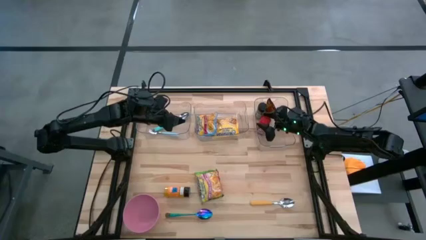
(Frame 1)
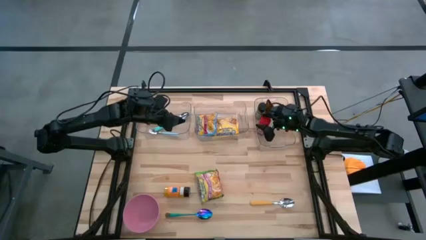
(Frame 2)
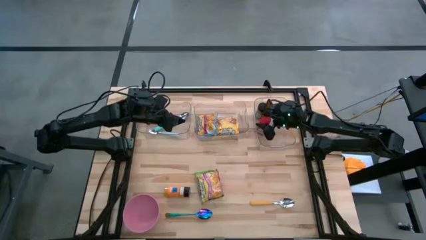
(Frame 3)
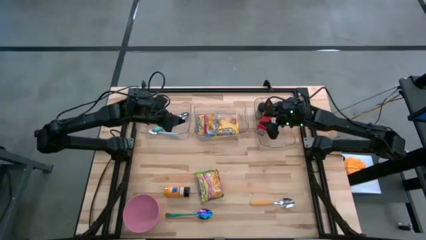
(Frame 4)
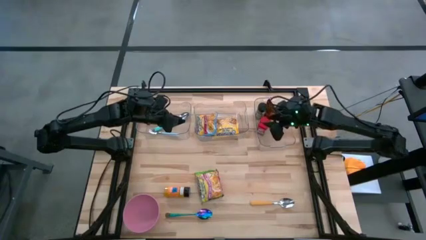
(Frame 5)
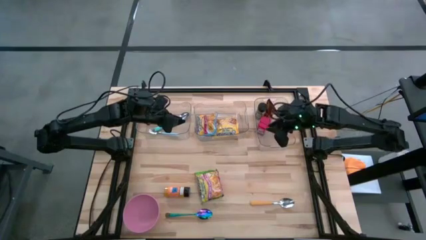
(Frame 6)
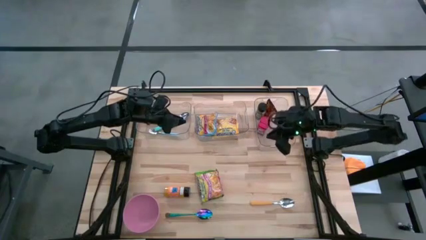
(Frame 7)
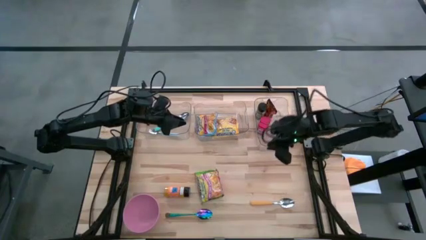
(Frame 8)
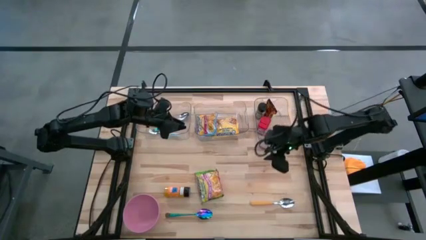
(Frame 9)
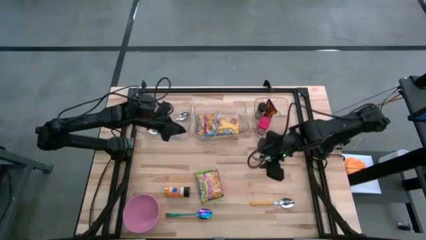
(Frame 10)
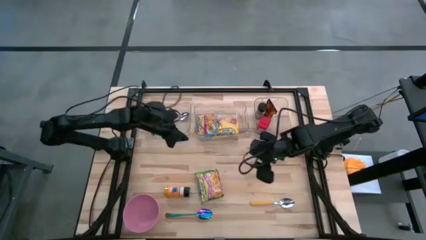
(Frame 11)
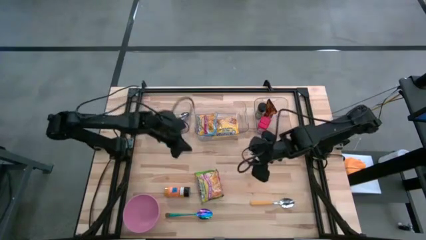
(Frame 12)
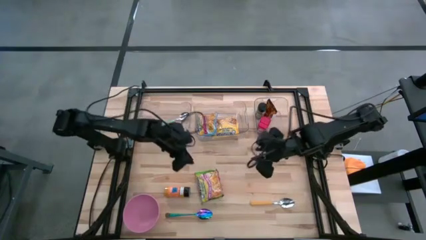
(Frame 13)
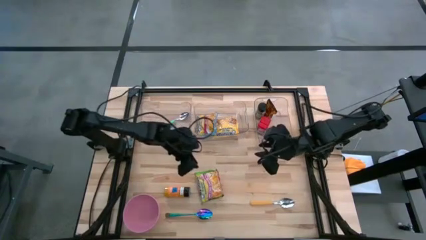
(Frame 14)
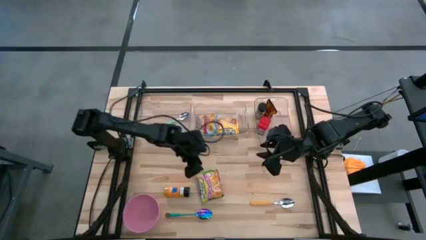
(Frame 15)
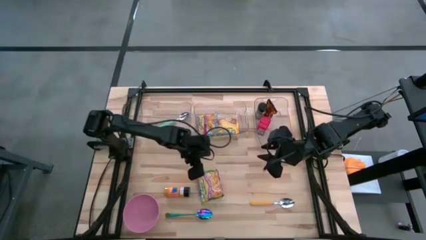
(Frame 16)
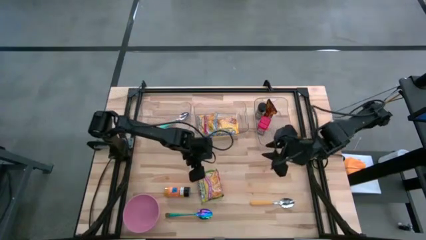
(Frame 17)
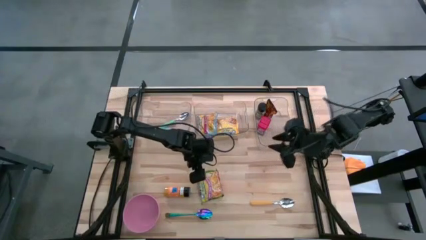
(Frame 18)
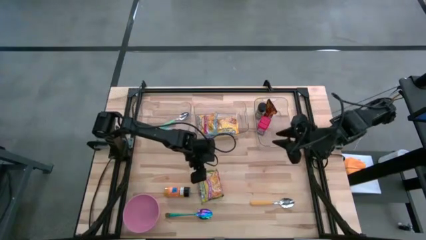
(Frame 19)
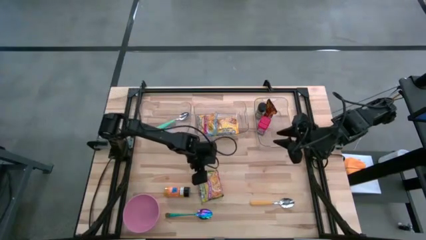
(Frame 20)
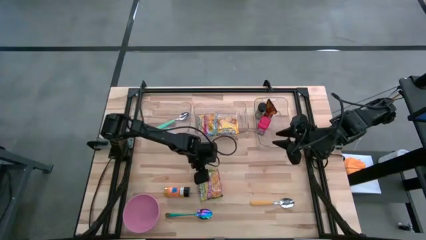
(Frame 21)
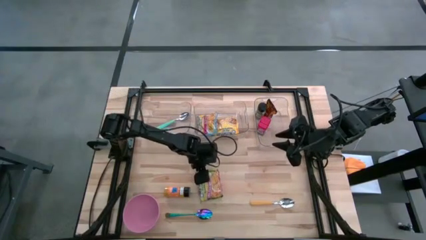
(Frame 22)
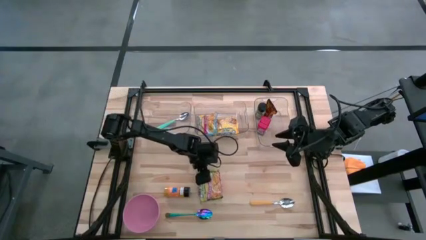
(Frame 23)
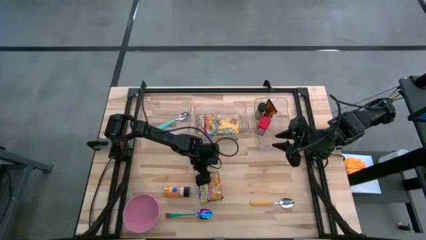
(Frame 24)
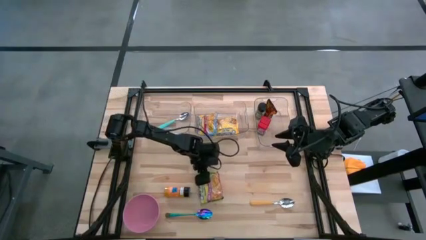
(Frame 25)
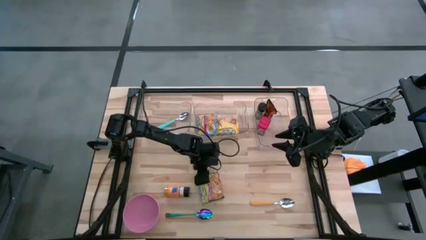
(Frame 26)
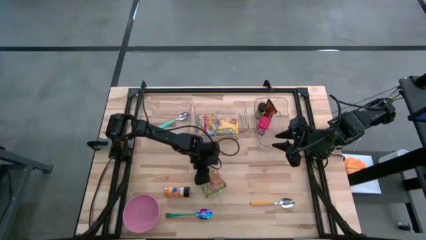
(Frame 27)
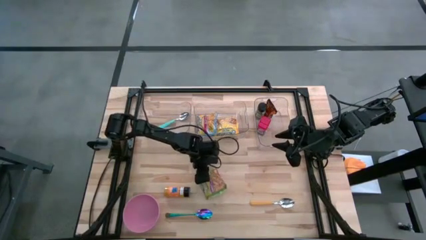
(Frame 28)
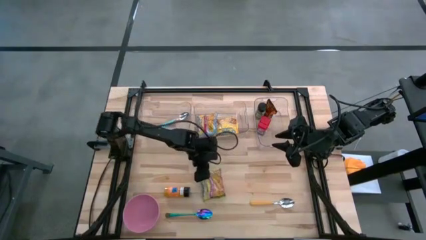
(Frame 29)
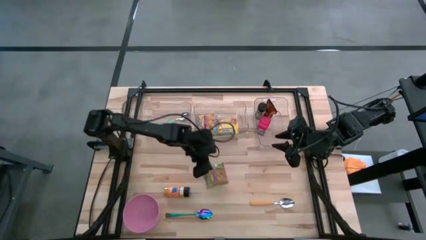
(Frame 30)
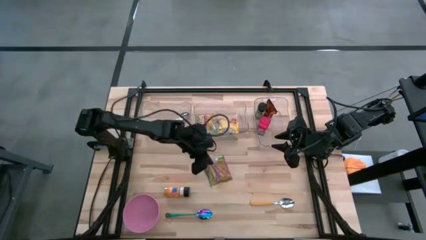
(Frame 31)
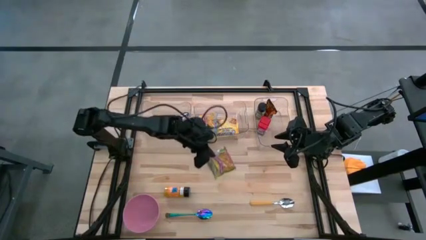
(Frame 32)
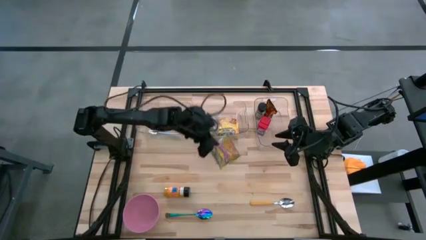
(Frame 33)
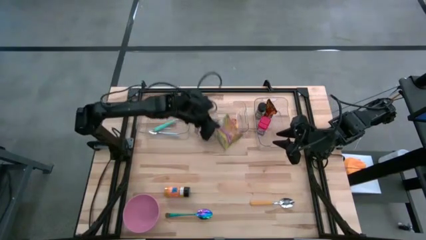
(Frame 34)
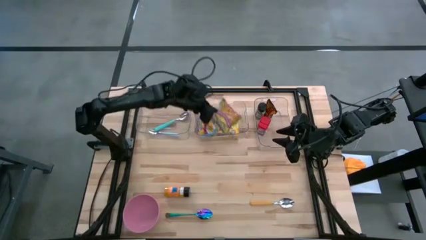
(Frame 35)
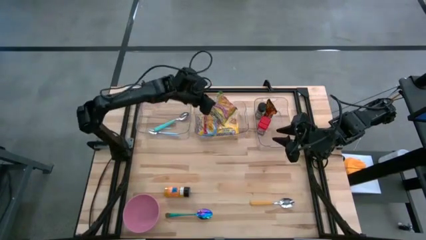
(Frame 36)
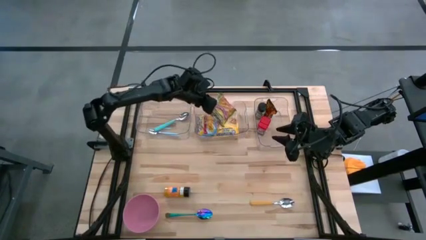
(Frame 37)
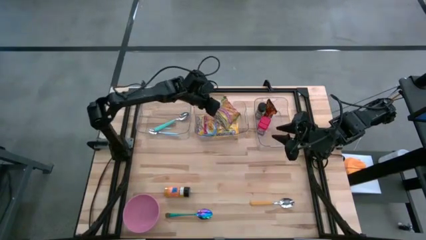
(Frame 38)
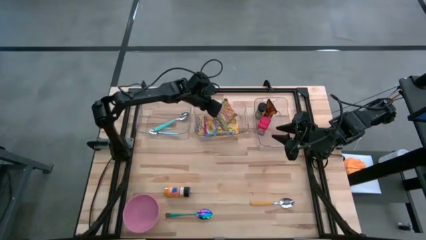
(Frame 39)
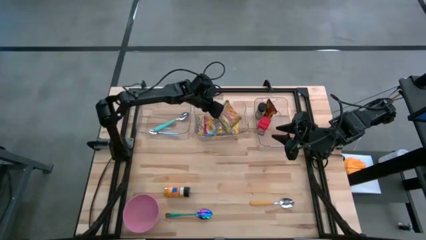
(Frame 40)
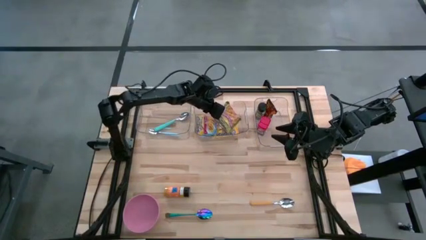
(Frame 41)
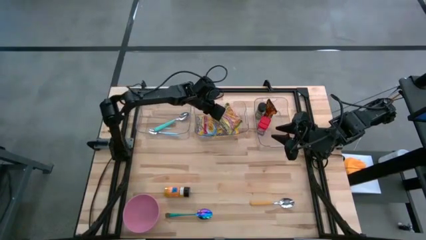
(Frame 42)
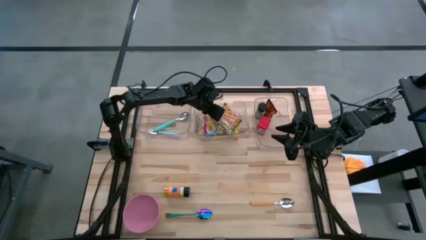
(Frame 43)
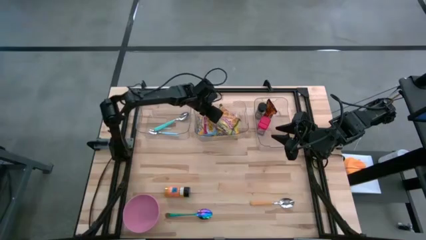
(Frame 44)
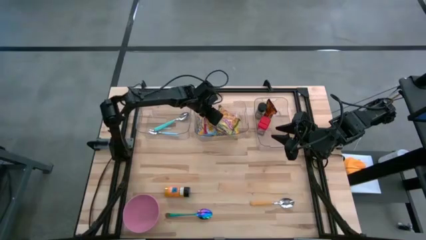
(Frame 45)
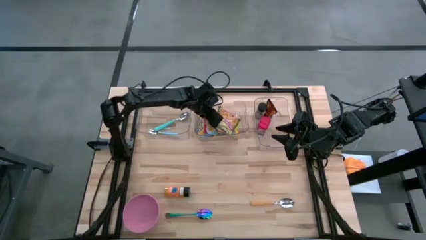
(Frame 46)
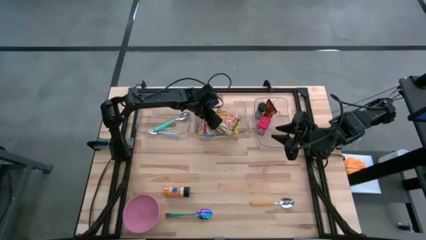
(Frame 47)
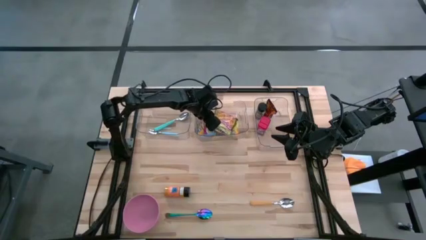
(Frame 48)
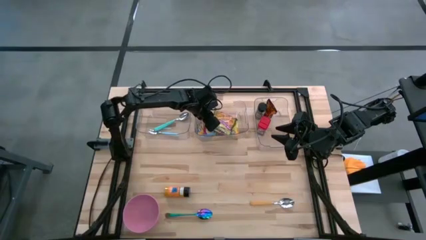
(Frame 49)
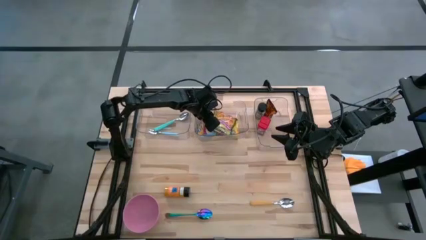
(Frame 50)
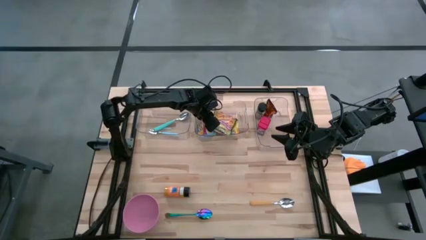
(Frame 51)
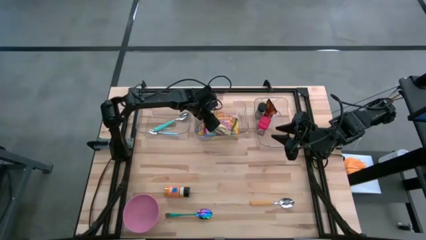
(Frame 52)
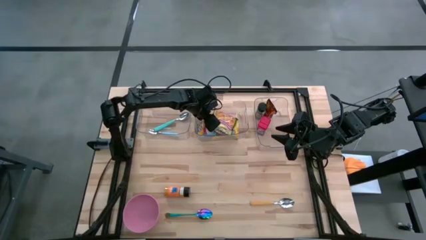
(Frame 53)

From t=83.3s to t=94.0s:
Put the green noodle pack into the middle transparent bin

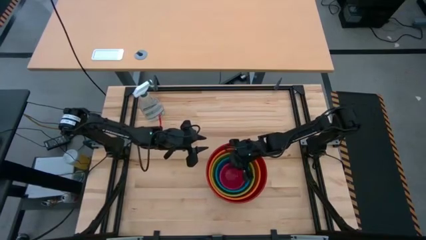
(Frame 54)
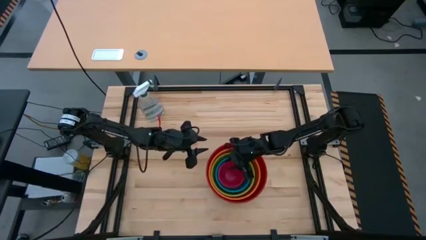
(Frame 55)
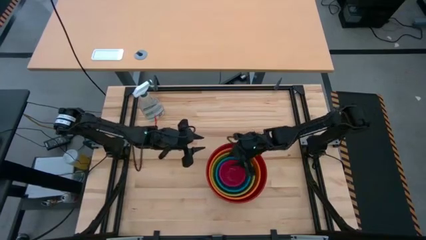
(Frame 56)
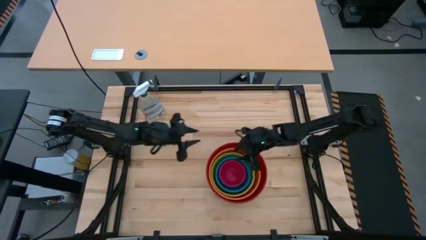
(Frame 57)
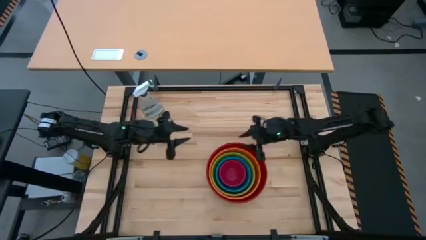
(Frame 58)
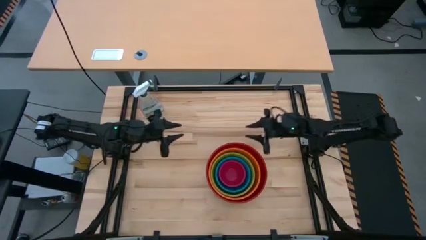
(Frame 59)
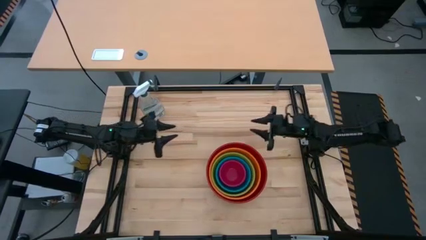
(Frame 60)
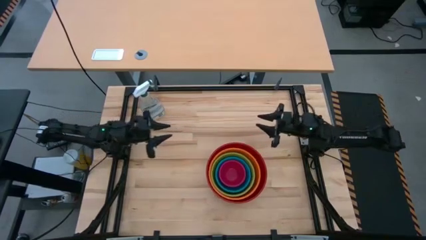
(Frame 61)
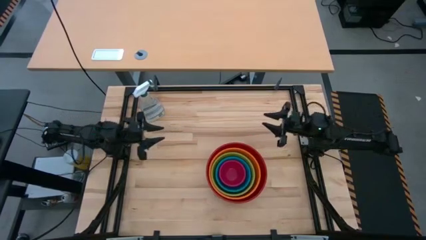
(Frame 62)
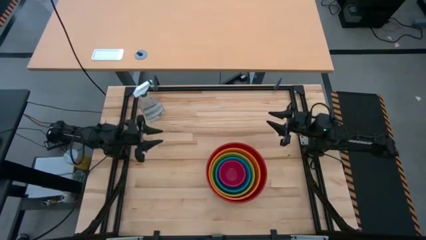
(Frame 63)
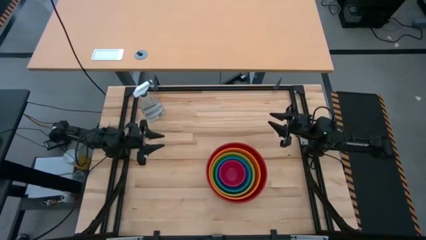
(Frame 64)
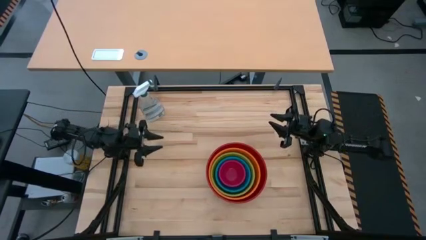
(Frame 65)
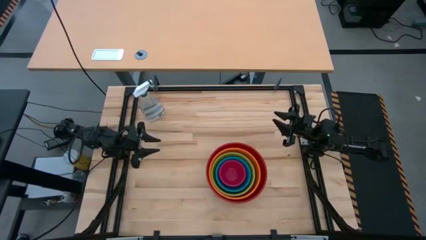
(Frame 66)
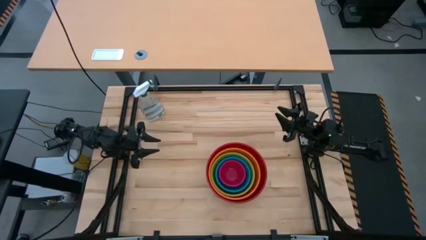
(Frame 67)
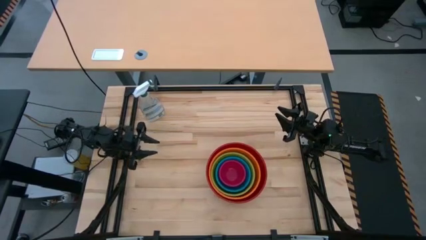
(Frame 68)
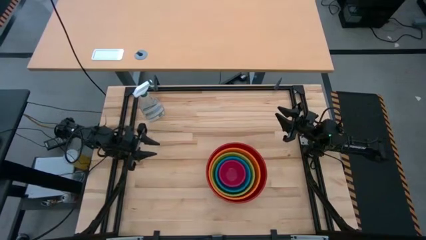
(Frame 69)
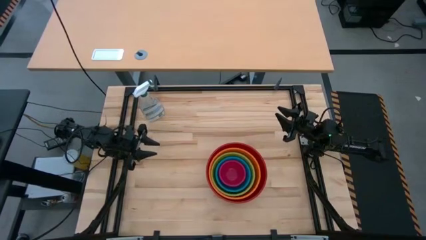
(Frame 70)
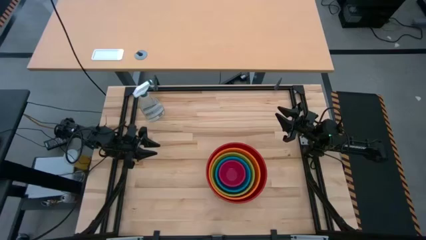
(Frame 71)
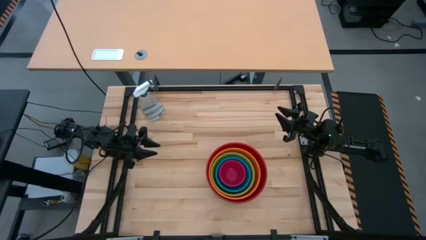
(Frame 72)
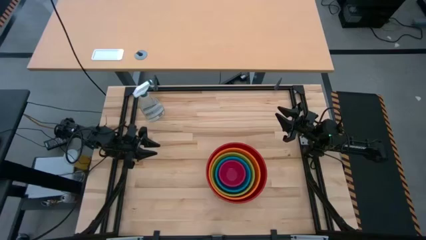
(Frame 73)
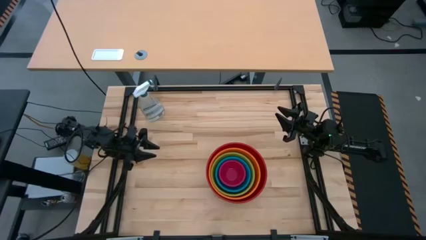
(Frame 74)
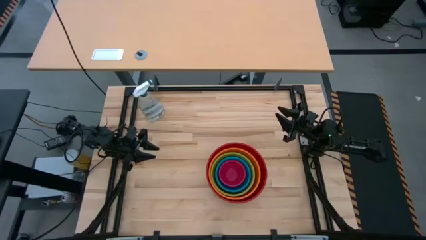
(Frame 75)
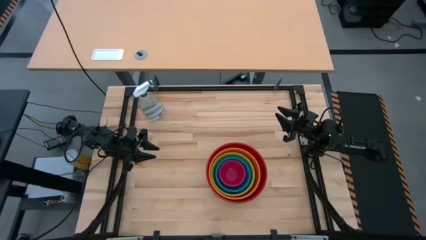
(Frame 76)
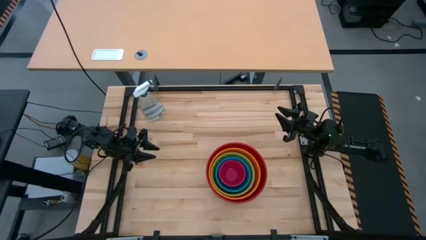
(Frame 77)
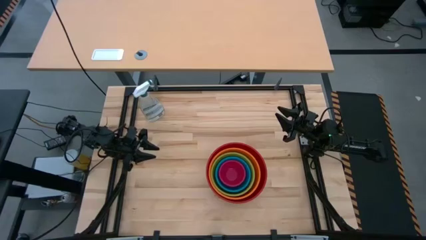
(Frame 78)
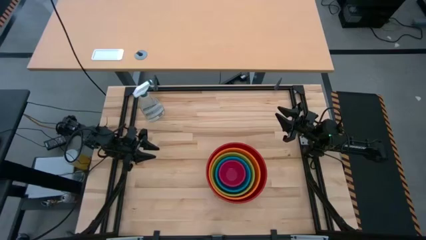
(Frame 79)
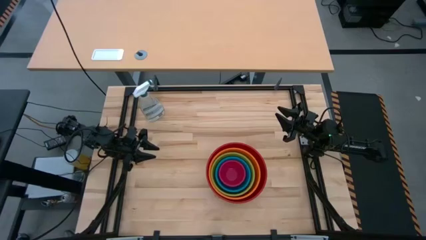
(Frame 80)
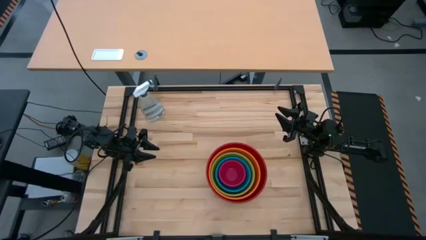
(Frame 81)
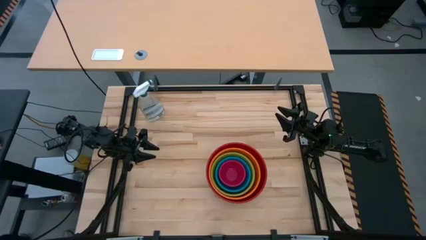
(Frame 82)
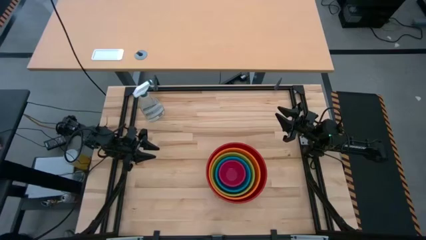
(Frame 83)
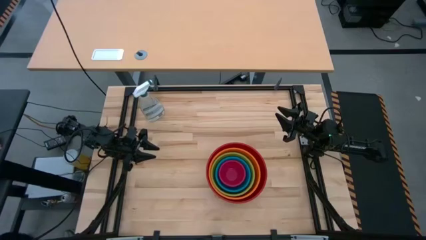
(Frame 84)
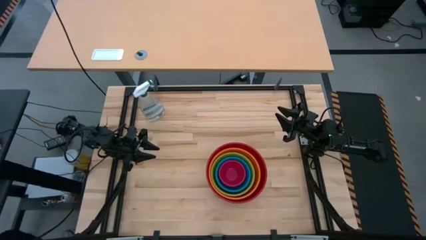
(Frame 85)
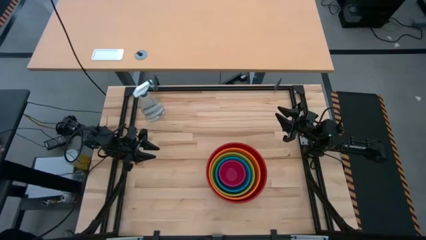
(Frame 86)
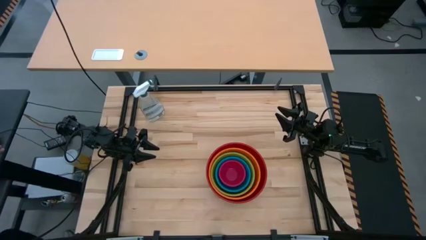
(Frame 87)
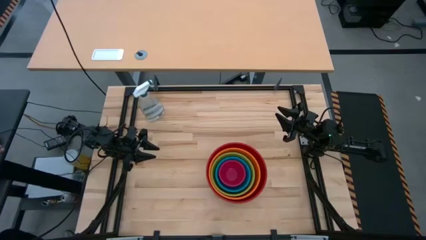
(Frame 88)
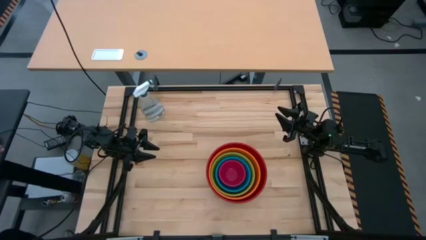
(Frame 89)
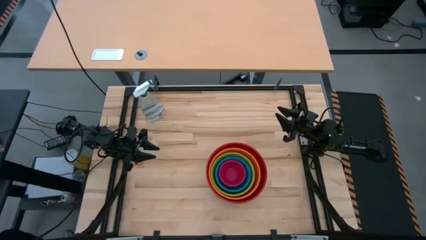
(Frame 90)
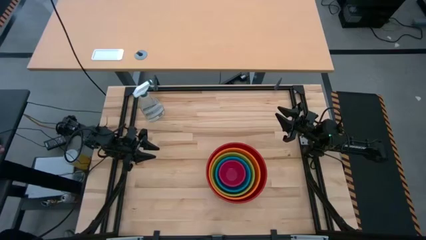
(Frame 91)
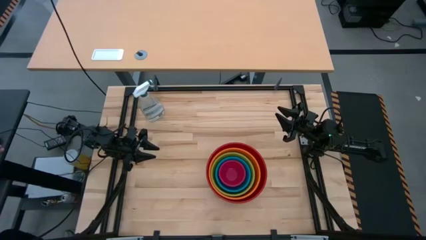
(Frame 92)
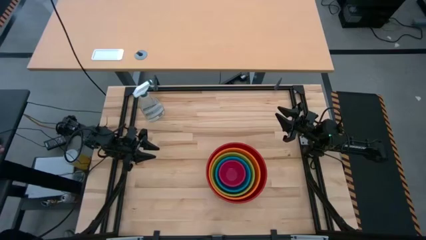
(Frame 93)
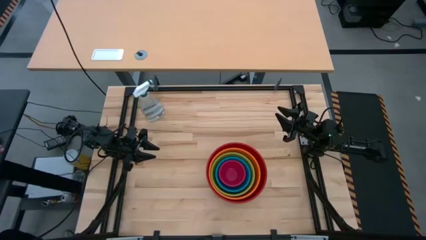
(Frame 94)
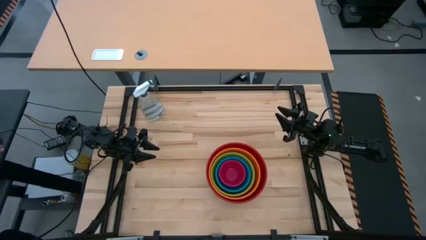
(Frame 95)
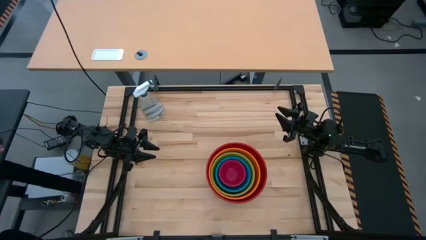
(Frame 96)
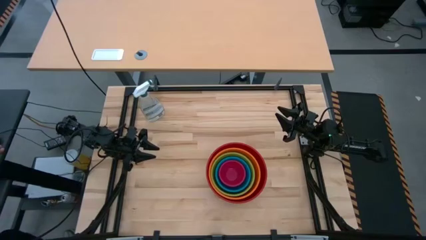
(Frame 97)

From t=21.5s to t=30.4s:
Return to Home Position
